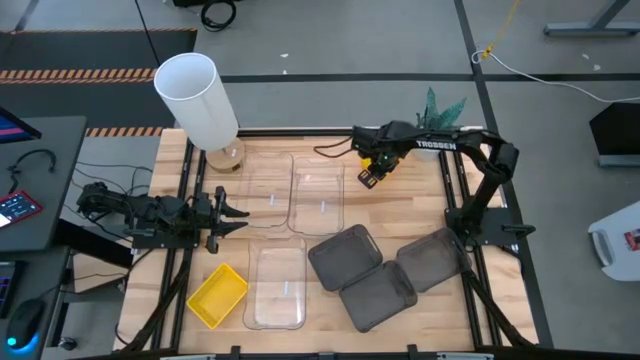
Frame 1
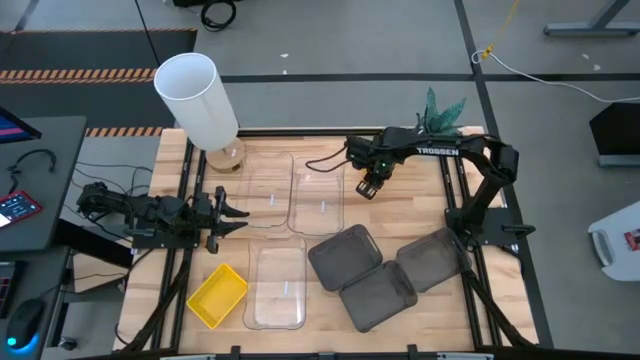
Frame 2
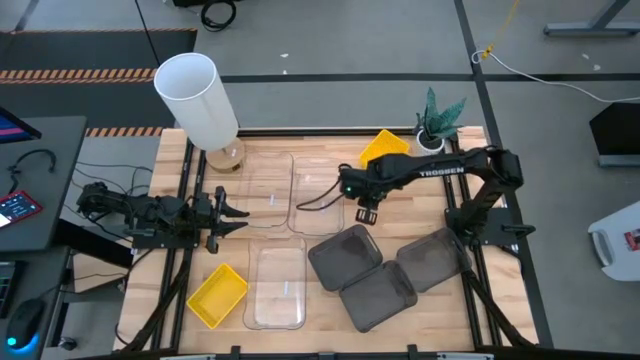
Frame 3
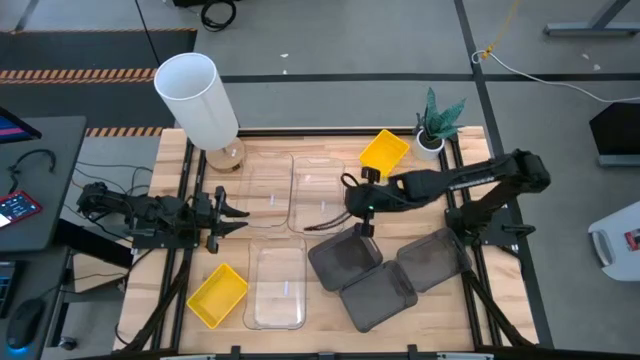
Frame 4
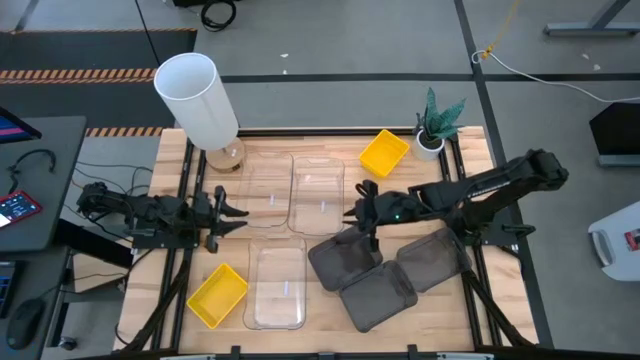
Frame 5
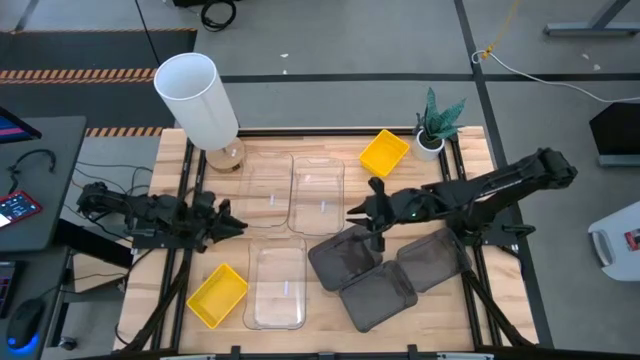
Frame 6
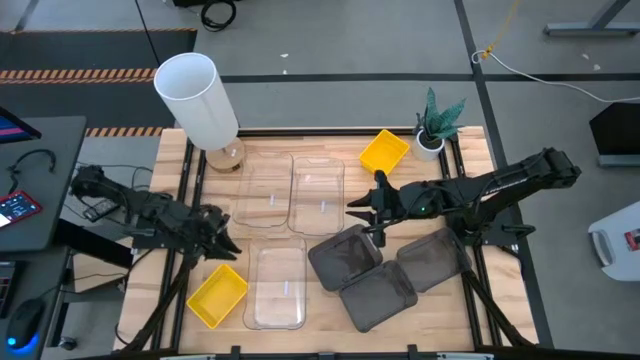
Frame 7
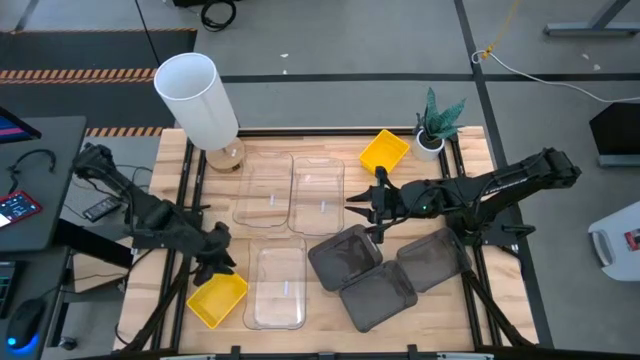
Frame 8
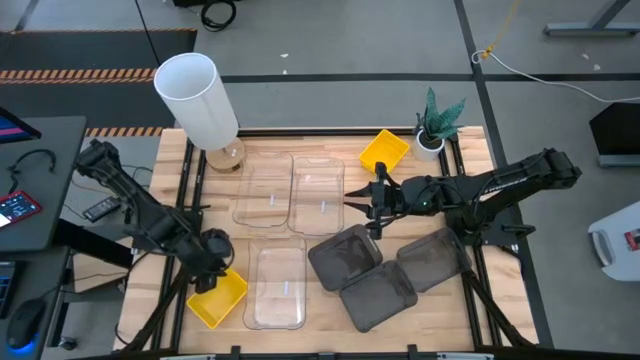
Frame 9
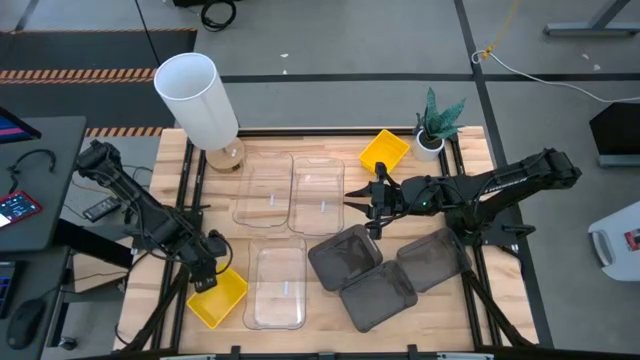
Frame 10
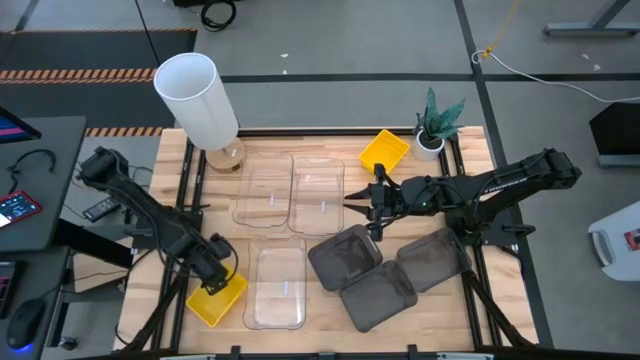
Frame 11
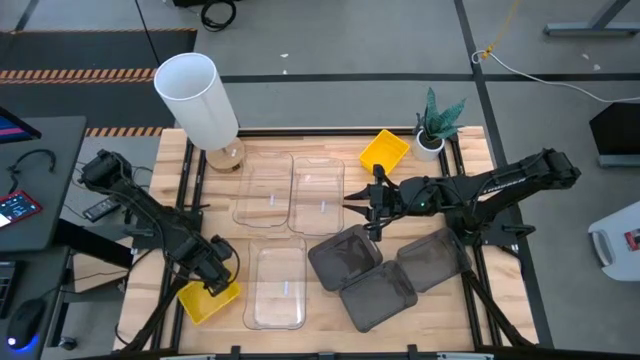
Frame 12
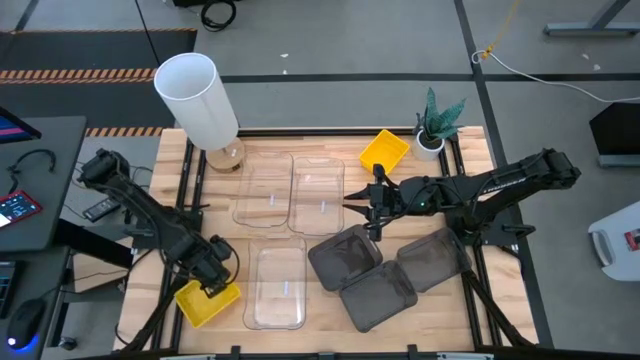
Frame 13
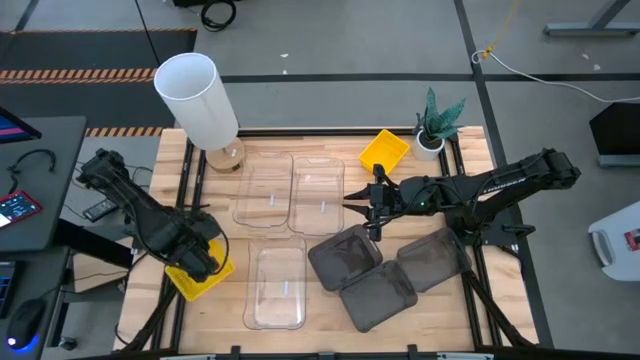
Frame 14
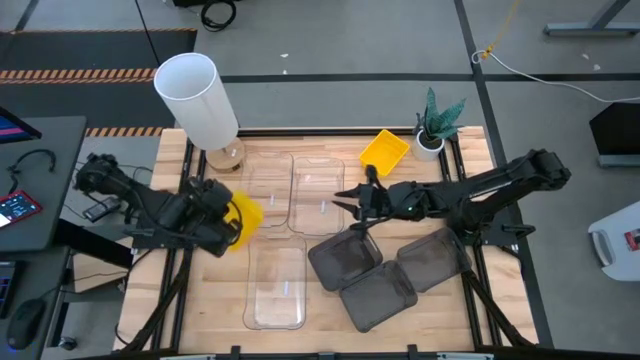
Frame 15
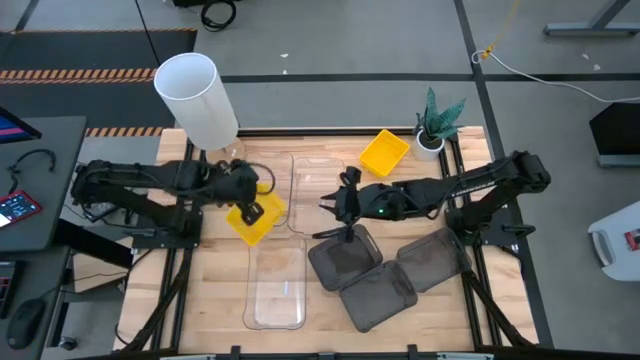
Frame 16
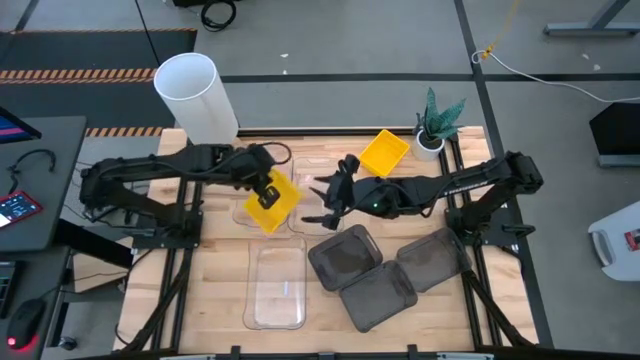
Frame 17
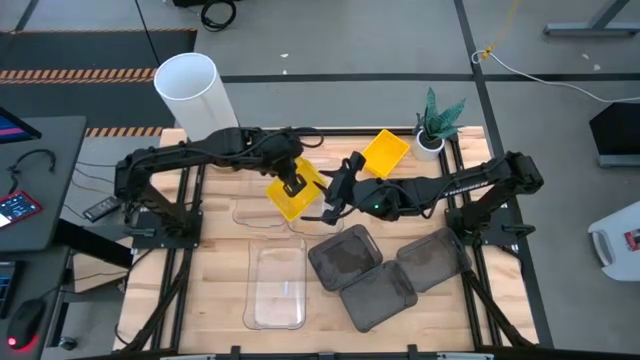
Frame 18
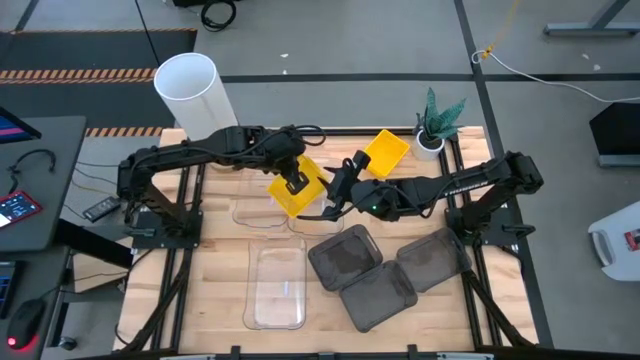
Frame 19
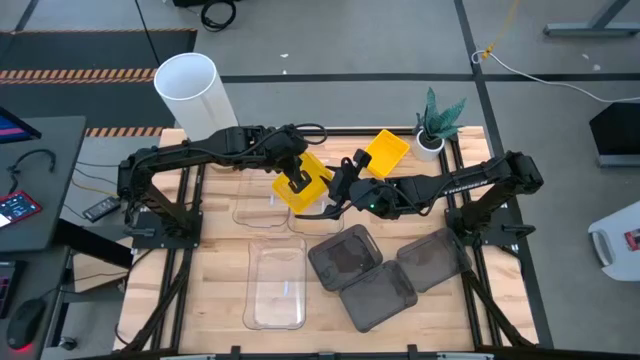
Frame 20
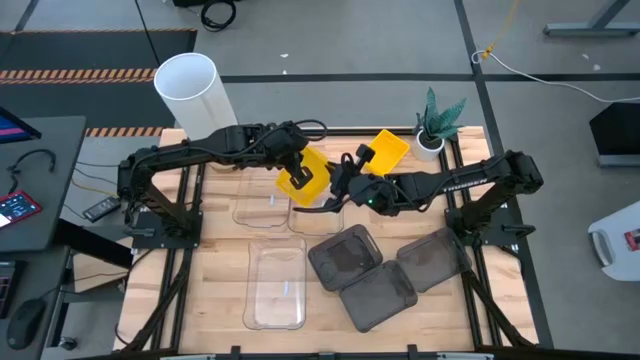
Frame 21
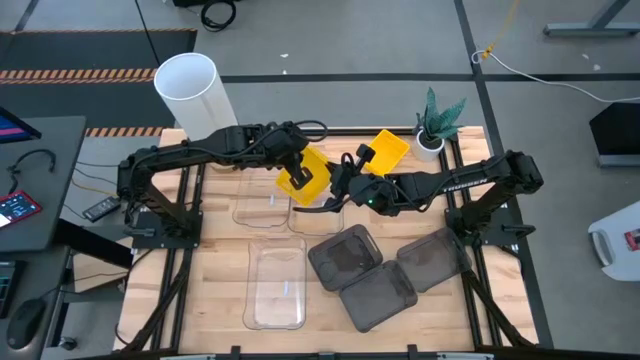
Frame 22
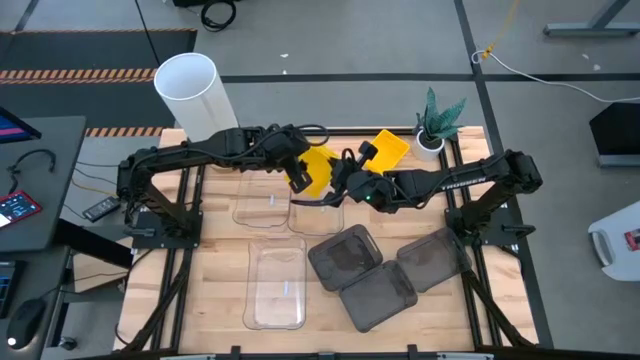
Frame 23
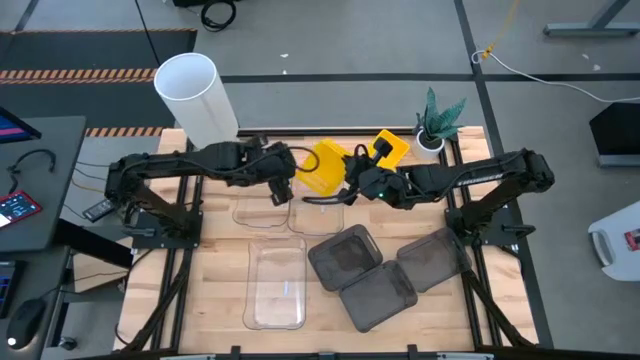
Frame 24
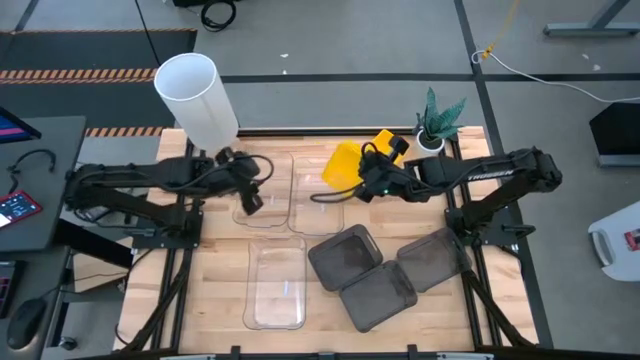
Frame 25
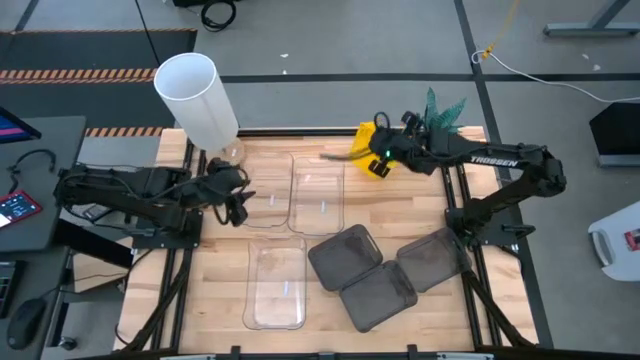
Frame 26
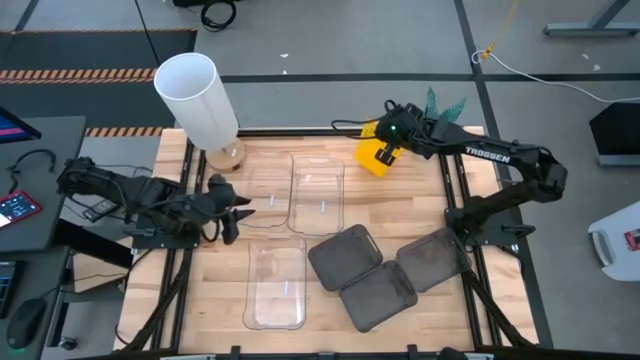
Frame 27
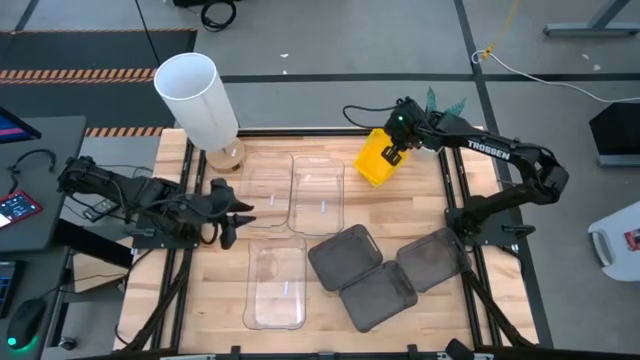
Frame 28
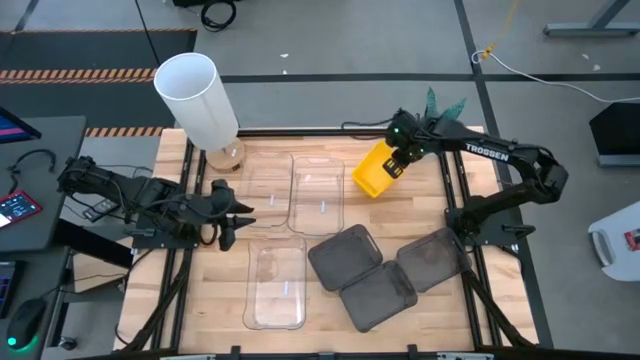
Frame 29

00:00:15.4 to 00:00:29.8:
Stack the bottom yellow bin on top of the top yellow bin
